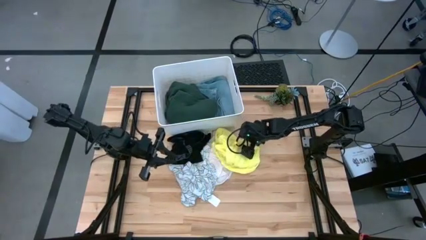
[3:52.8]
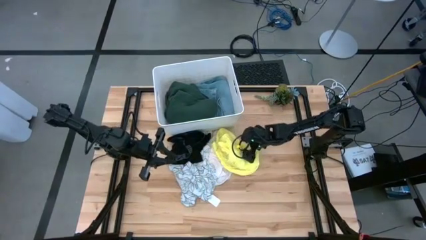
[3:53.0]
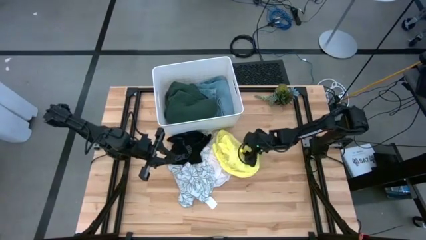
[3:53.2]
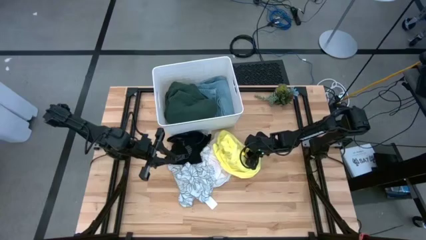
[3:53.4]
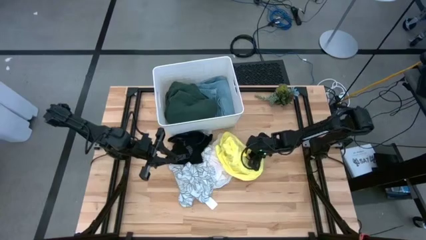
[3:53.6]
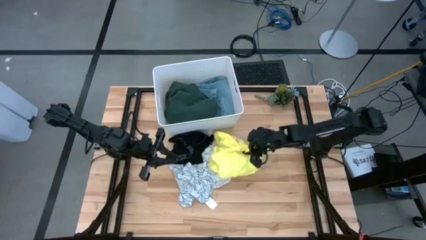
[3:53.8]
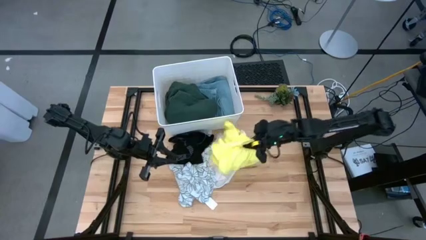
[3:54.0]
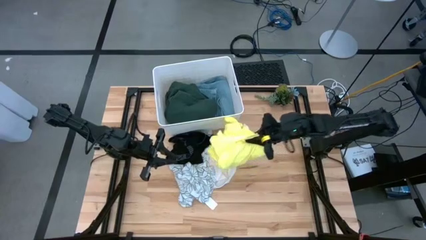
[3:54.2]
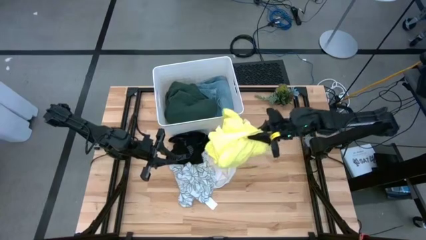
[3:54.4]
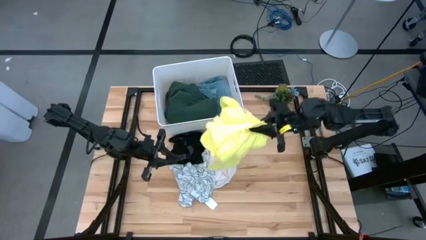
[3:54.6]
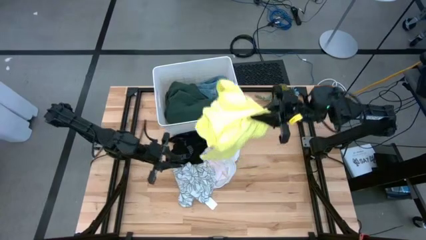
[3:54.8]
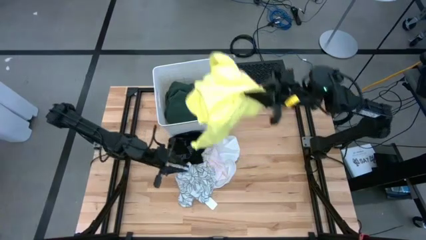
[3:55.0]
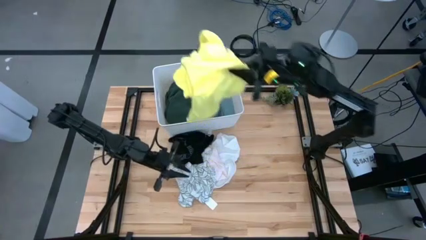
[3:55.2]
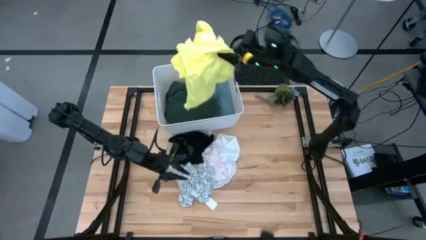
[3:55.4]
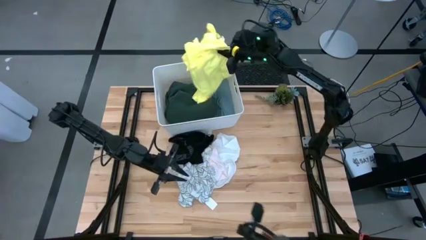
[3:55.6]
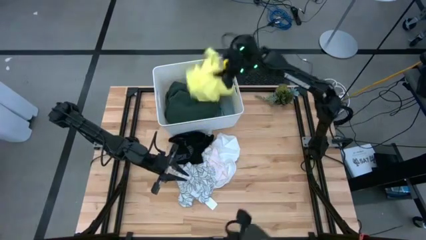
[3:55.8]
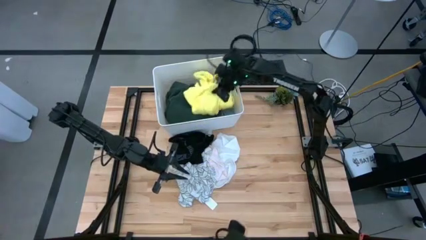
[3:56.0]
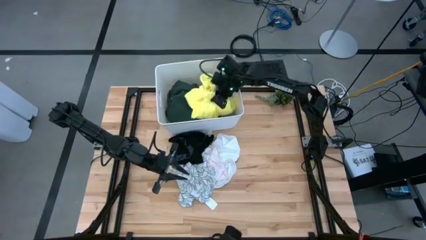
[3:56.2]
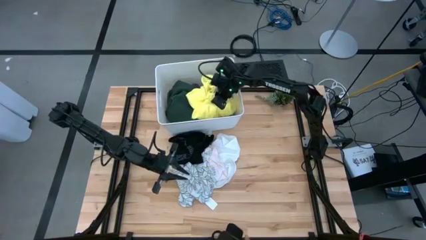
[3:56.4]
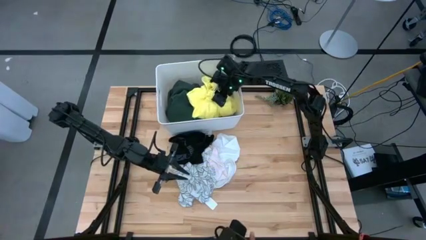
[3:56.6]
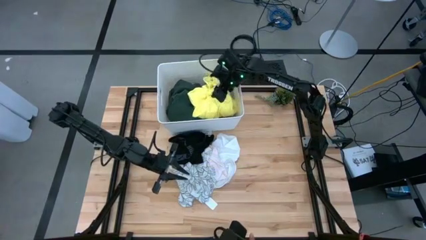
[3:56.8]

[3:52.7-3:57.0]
Task: Fold laundry
Put the folded yellow shirt into the white laundry bin

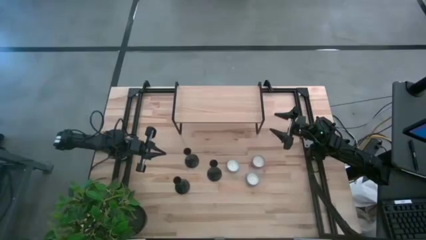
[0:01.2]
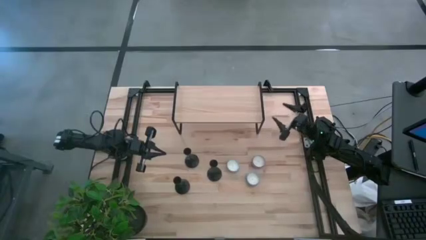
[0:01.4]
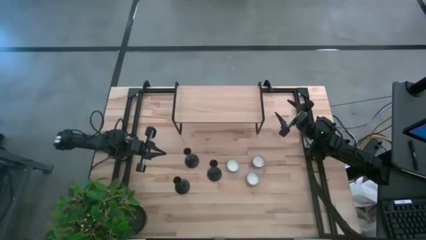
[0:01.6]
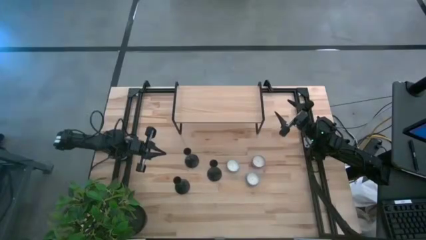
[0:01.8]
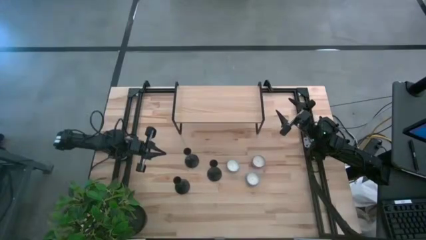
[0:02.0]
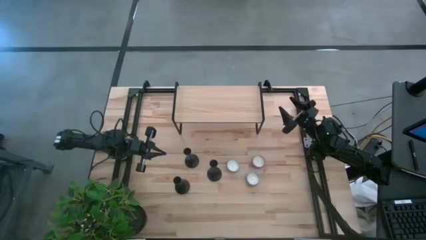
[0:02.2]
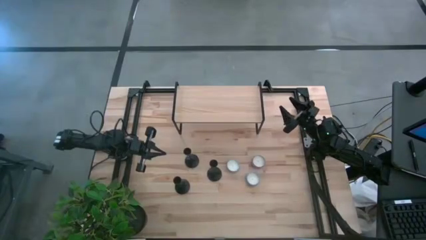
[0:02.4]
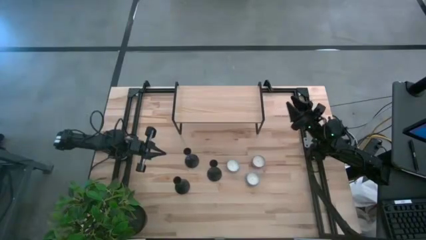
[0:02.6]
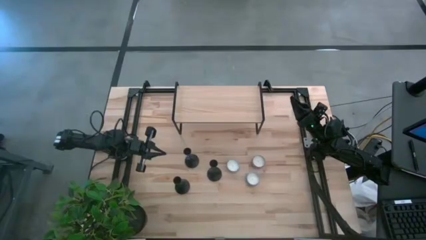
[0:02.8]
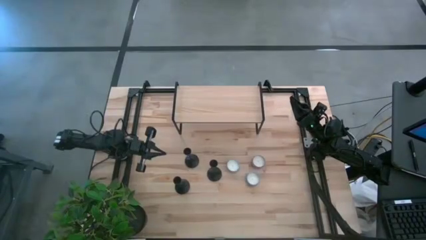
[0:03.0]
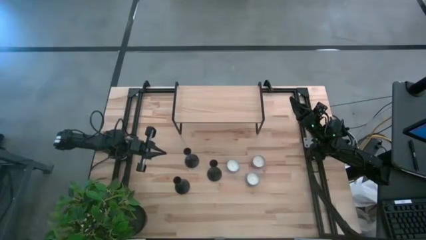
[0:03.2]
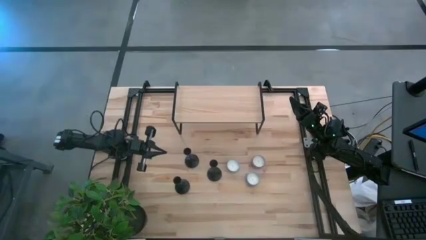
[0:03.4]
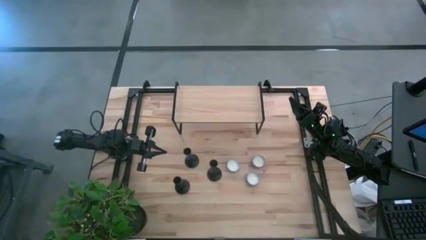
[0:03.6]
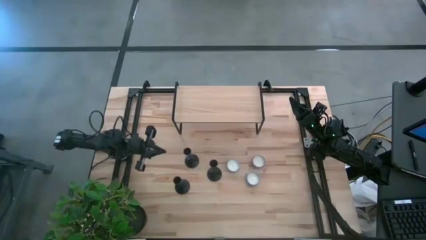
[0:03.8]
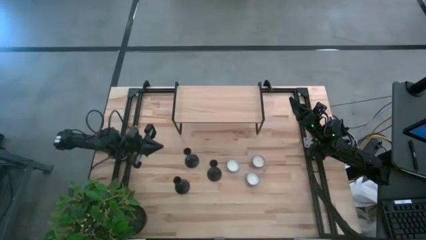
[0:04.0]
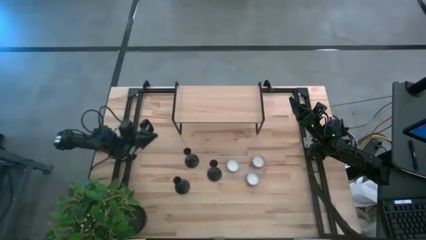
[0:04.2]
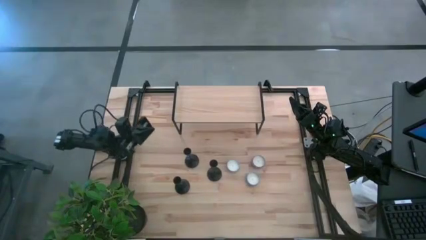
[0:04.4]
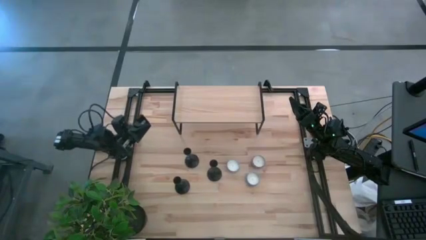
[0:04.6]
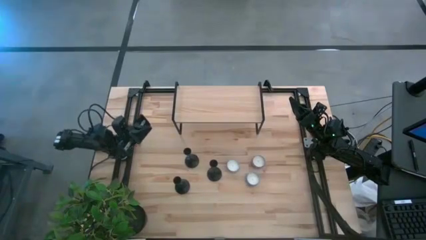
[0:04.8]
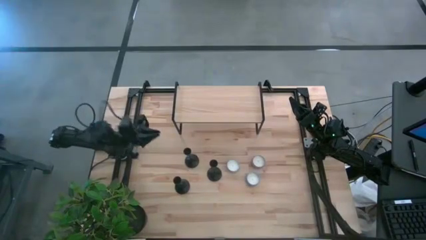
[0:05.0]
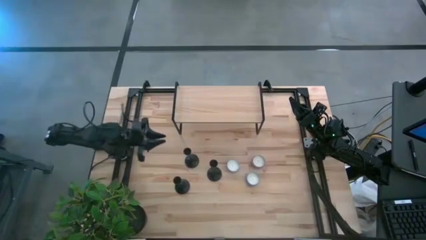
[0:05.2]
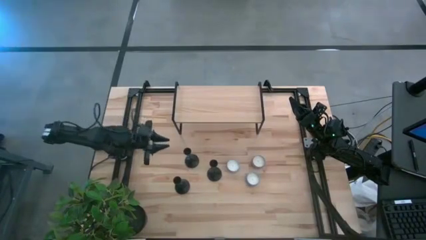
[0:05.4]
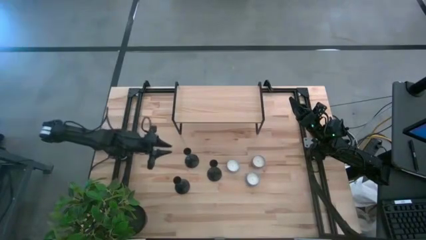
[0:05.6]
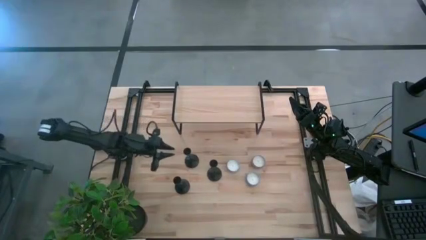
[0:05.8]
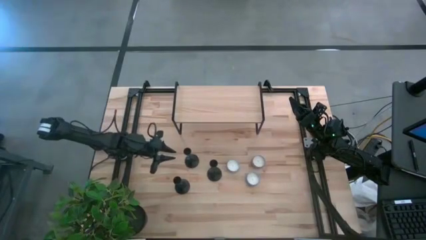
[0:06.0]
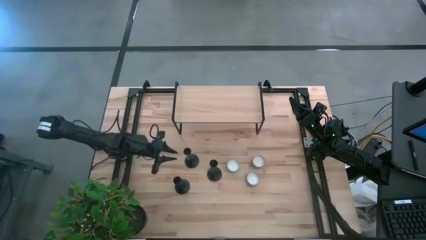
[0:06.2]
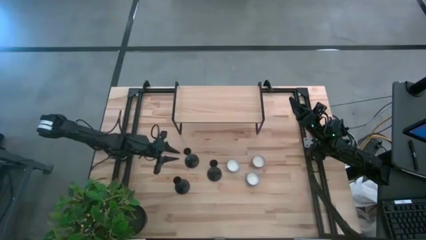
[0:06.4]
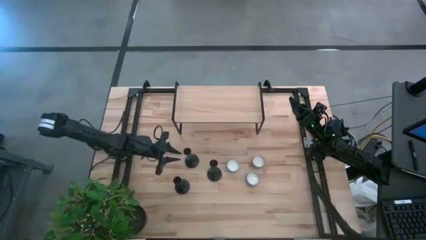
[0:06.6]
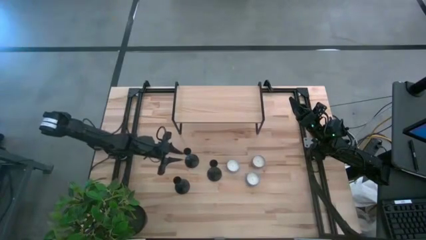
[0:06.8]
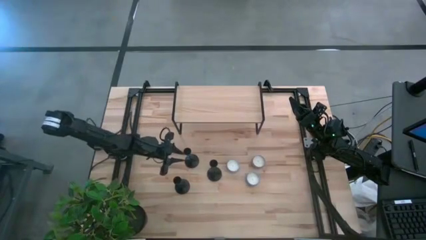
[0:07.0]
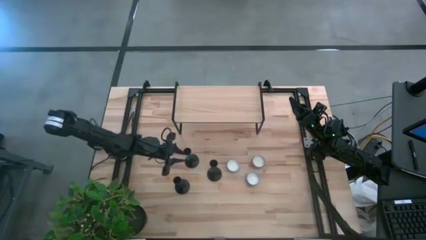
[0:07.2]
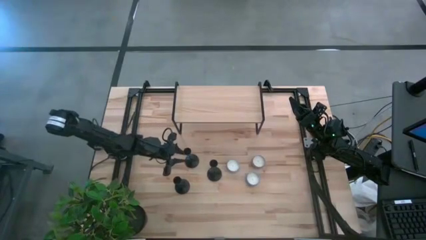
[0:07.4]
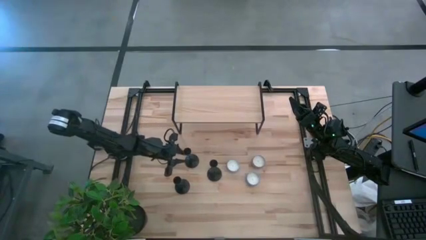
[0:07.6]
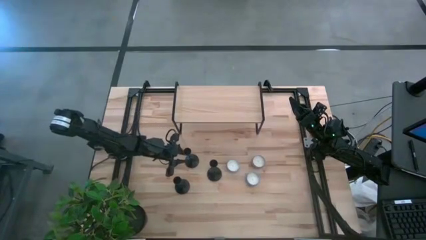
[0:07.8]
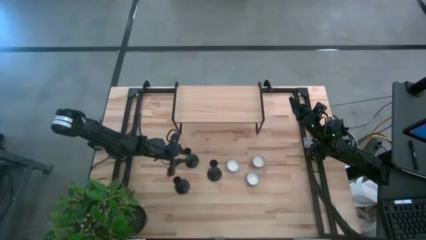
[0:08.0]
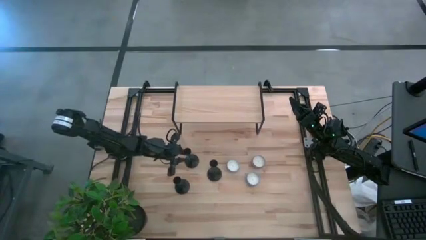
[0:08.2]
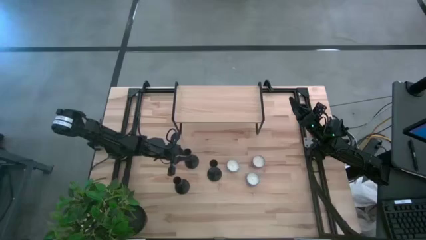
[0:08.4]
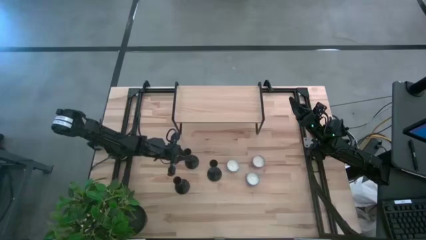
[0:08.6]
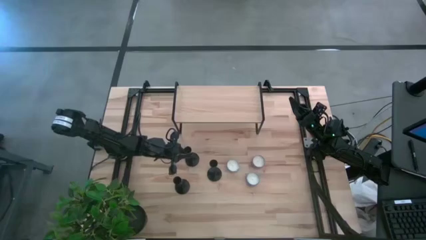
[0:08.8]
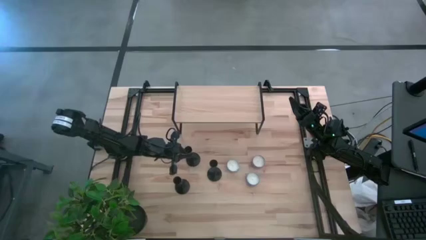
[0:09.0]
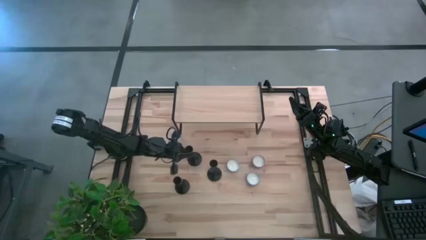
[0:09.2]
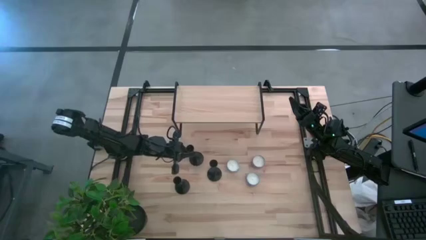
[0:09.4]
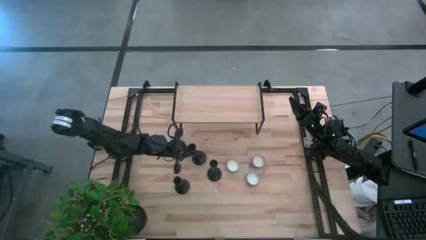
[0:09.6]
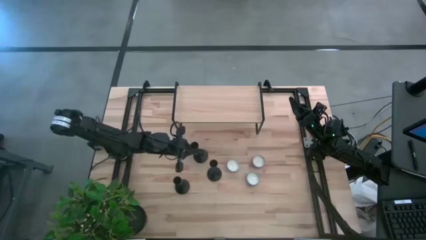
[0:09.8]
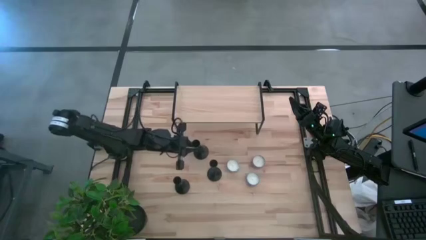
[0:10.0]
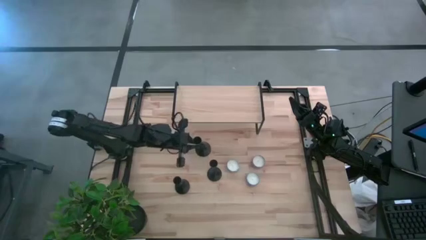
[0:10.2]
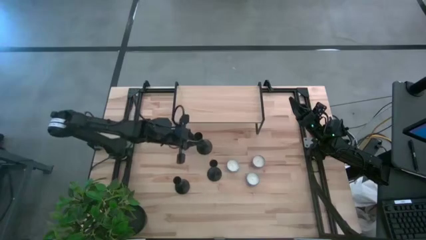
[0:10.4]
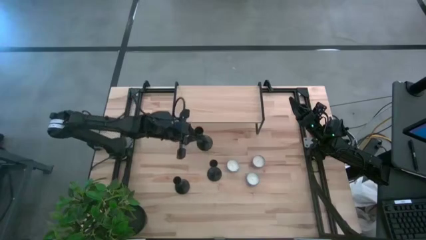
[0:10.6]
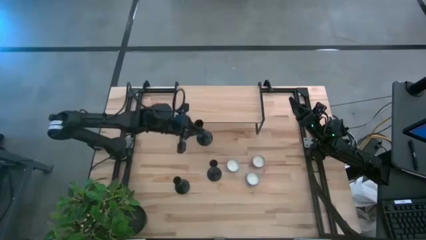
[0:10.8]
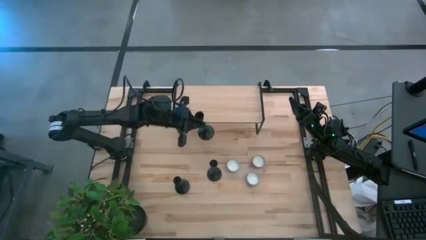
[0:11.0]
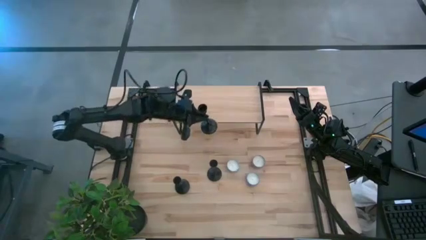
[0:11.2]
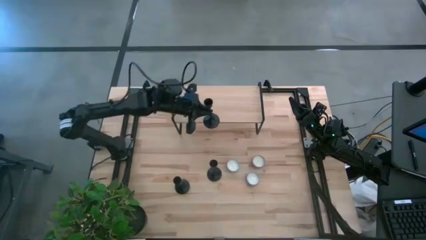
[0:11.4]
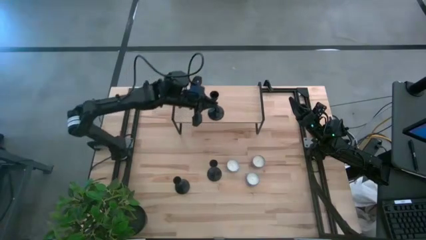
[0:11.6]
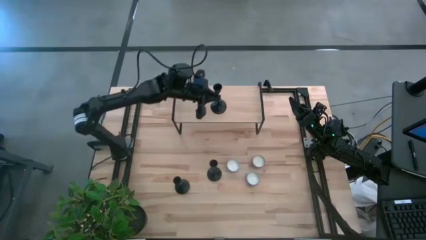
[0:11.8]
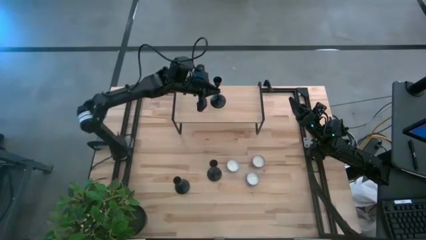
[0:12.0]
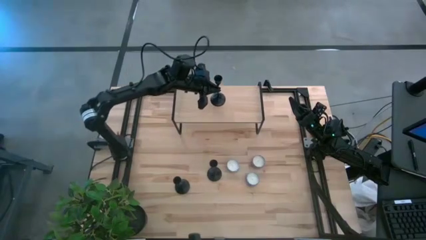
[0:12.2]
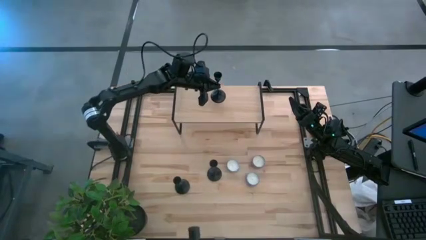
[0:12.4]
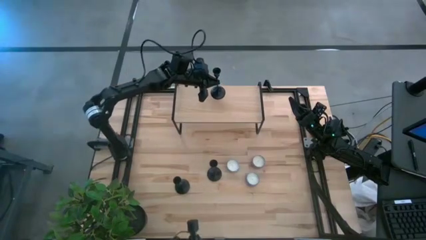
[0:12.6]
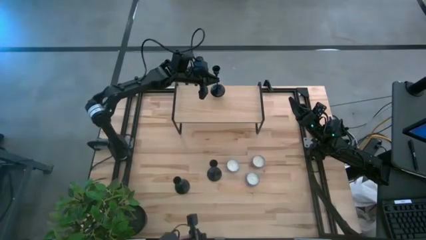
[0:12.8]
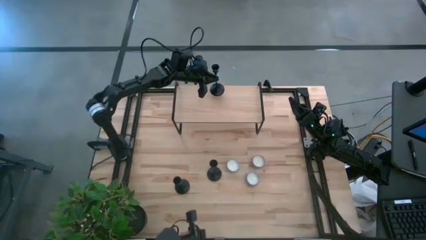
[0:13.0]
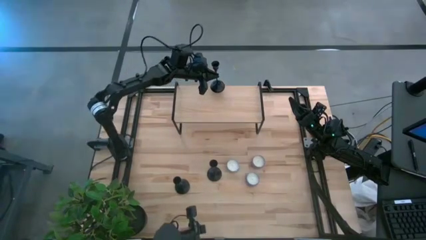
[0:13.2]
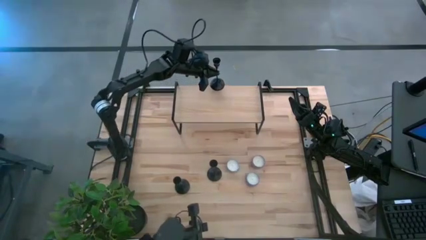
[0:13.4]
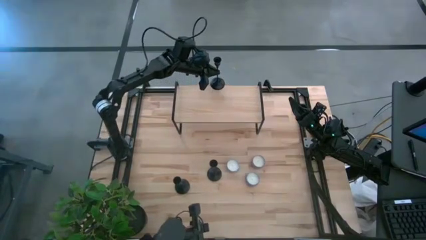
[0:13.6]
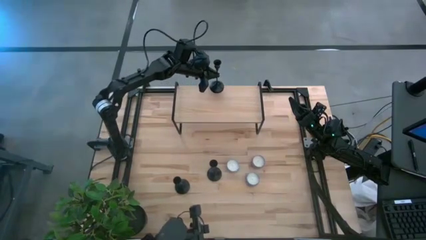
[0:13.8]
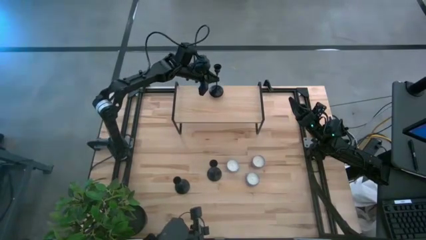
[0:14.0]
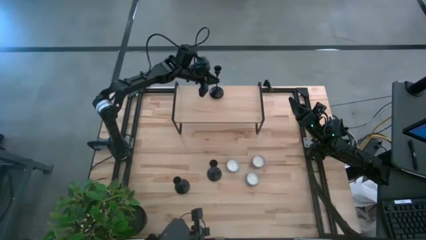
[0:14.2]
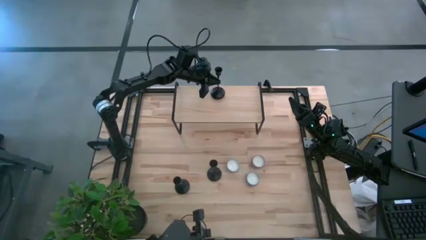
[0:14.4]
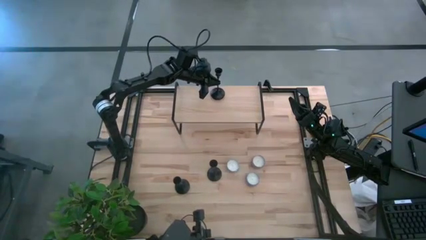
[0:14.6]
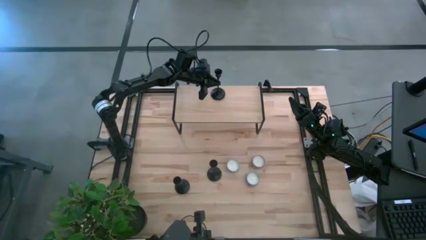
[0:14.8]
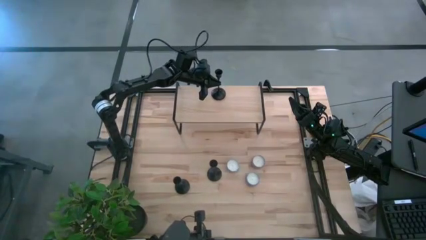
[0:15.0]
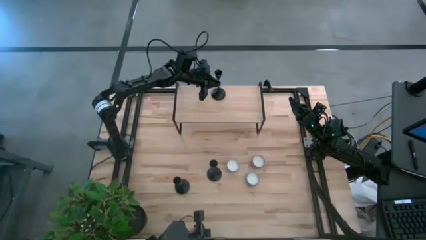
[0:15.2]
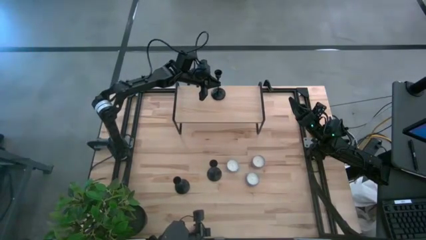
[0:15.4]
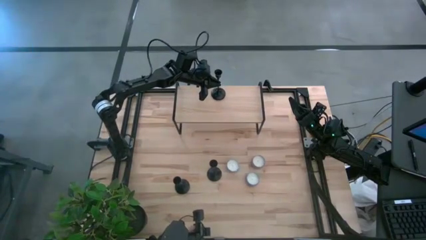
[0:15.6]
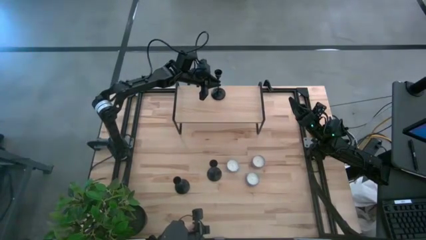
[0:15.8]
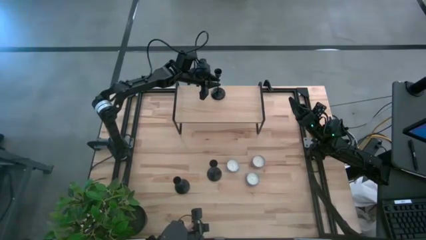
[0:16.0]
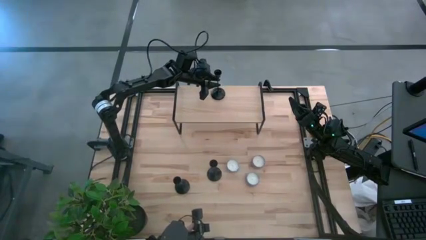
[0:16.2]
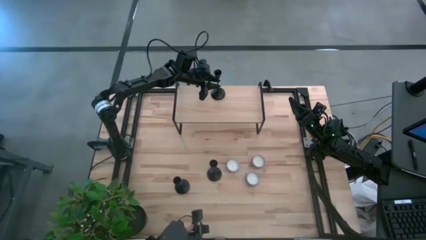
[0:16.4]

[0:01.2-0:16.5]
Task: Pick & Place candle stick holders
Put the top black candle holder on the shelf
